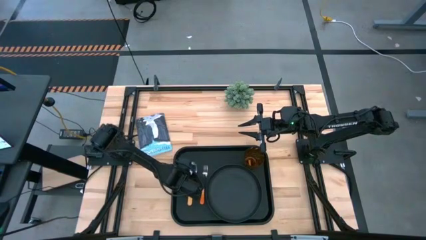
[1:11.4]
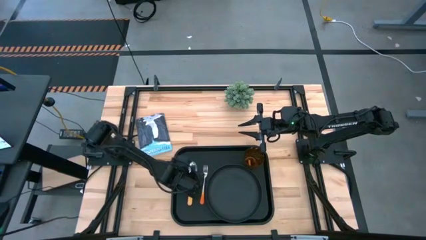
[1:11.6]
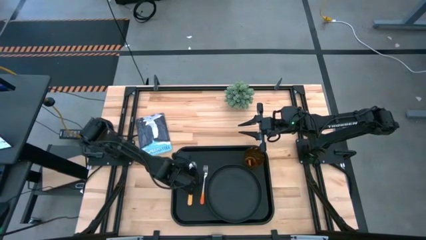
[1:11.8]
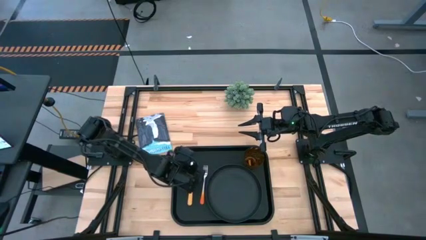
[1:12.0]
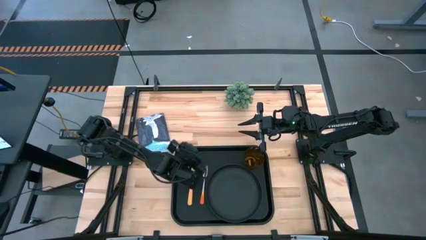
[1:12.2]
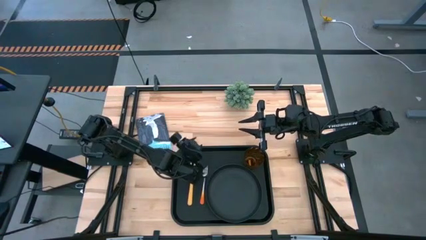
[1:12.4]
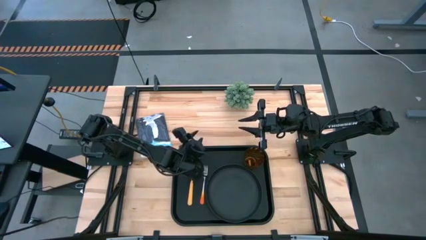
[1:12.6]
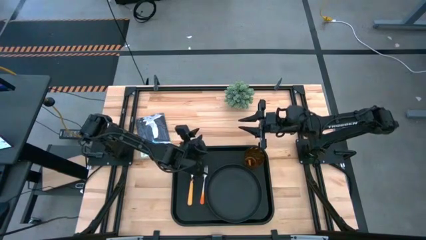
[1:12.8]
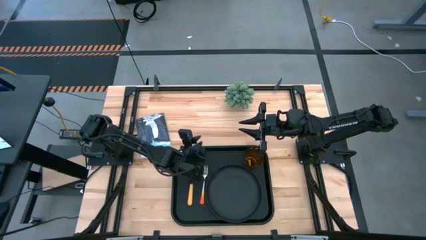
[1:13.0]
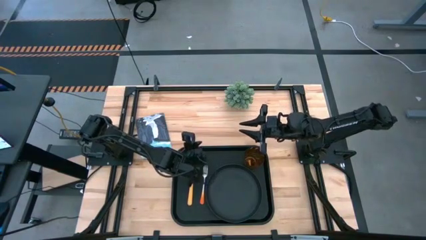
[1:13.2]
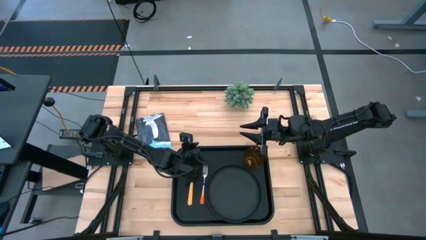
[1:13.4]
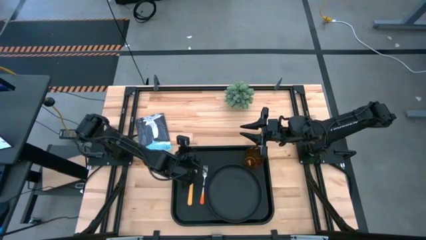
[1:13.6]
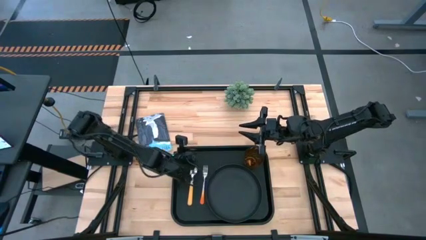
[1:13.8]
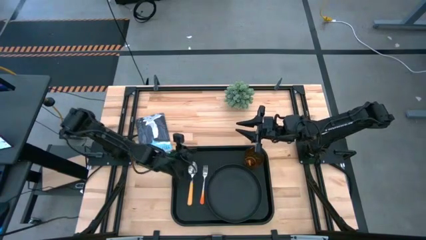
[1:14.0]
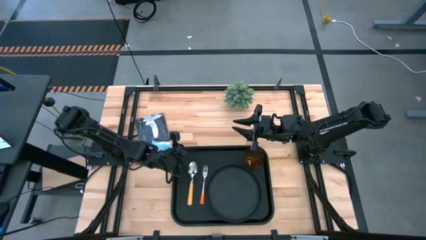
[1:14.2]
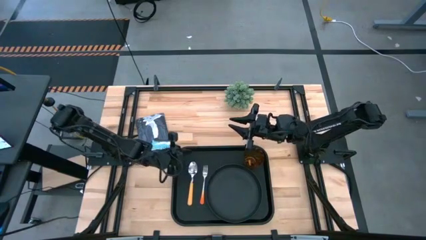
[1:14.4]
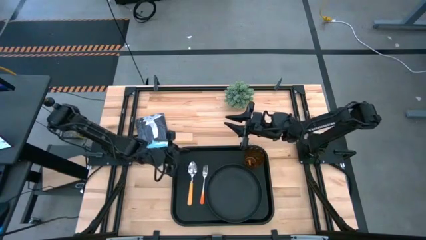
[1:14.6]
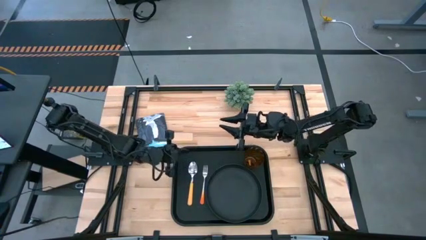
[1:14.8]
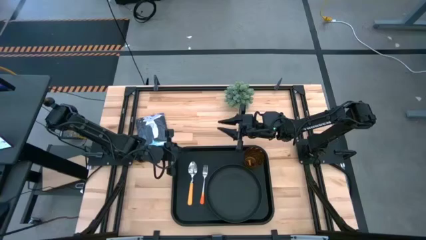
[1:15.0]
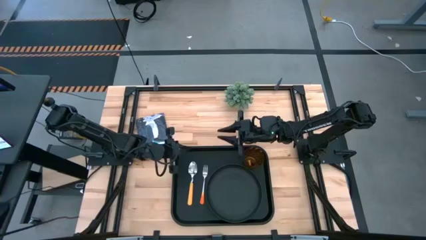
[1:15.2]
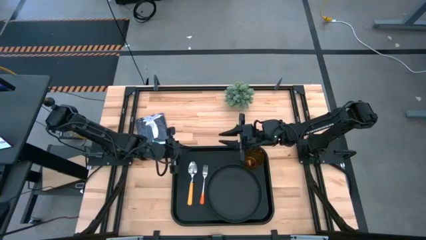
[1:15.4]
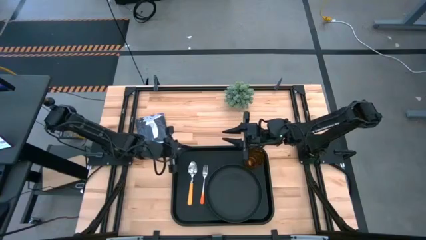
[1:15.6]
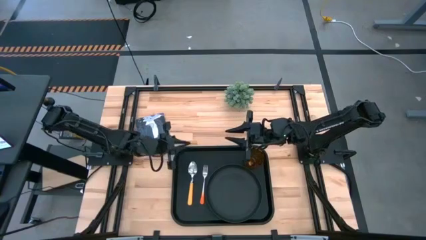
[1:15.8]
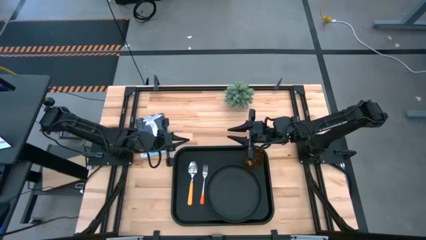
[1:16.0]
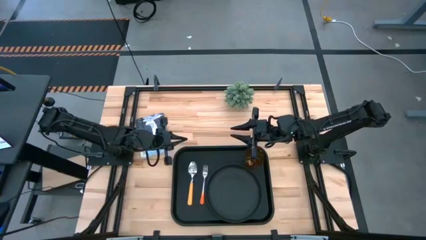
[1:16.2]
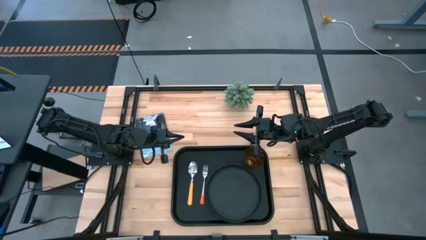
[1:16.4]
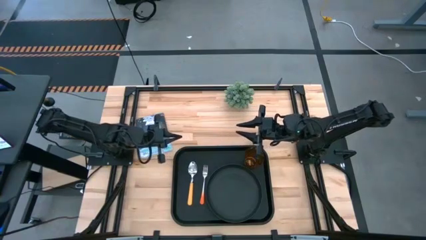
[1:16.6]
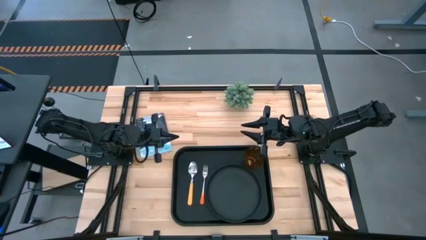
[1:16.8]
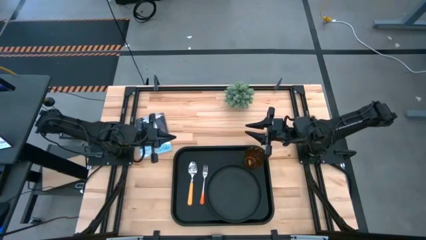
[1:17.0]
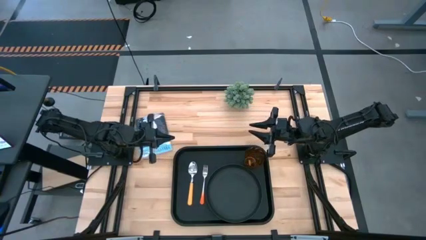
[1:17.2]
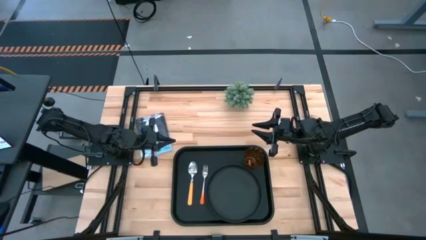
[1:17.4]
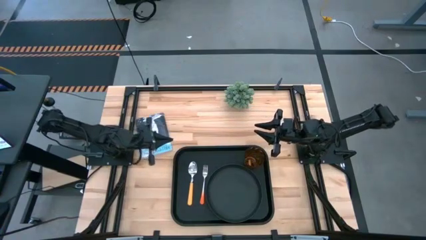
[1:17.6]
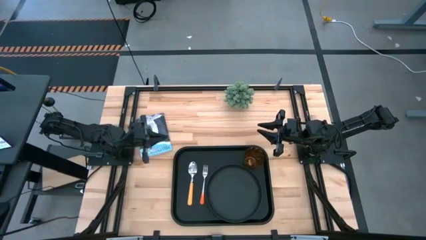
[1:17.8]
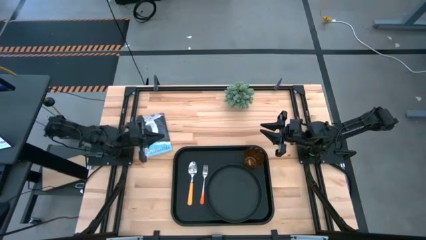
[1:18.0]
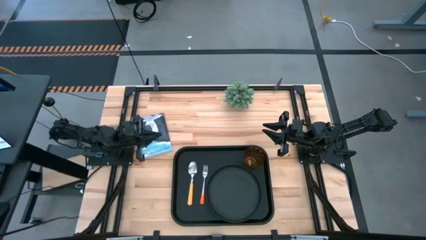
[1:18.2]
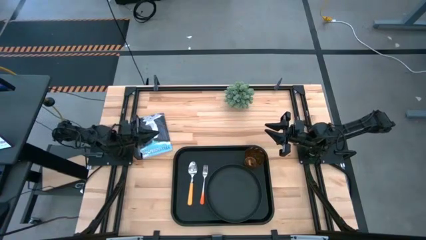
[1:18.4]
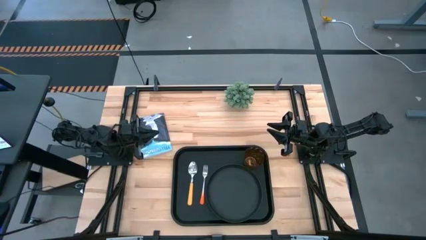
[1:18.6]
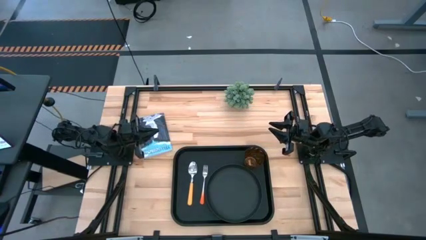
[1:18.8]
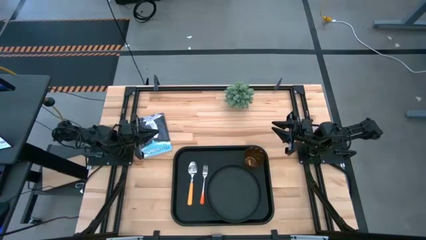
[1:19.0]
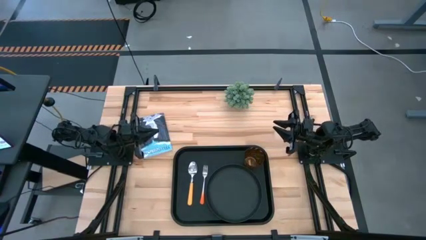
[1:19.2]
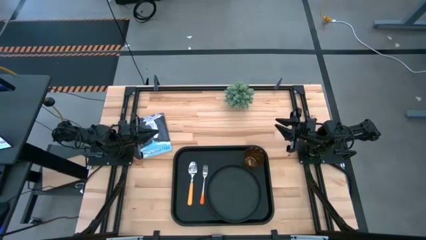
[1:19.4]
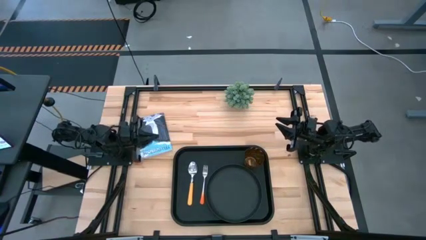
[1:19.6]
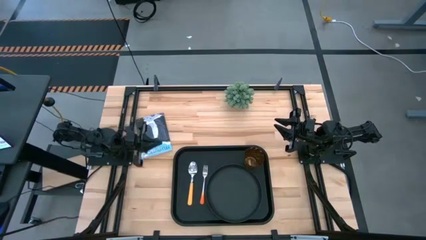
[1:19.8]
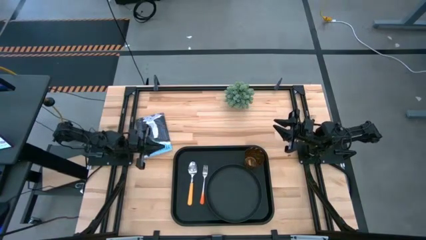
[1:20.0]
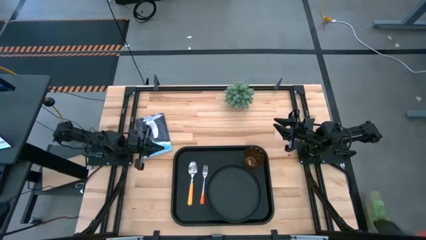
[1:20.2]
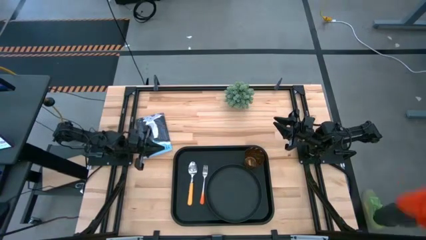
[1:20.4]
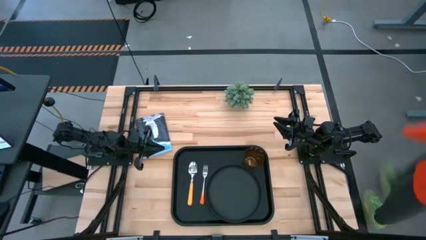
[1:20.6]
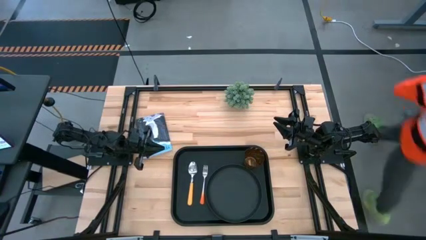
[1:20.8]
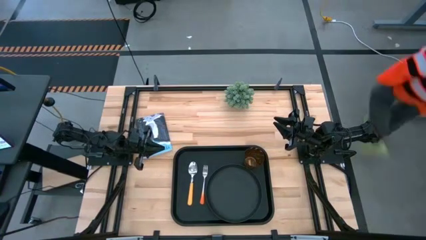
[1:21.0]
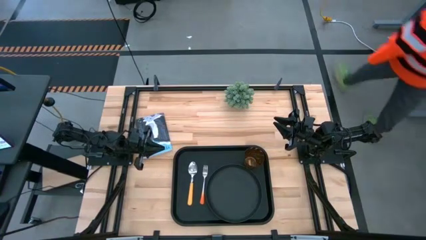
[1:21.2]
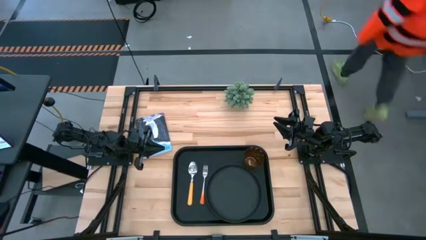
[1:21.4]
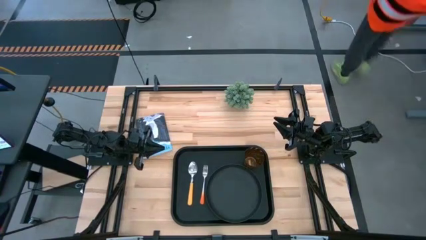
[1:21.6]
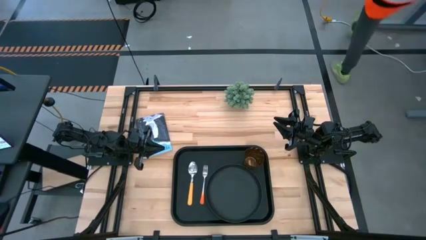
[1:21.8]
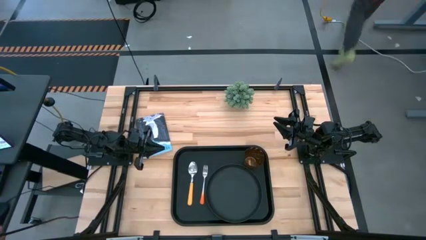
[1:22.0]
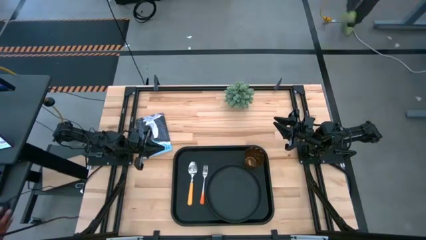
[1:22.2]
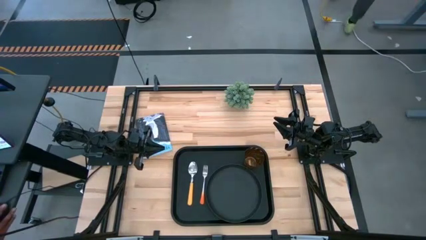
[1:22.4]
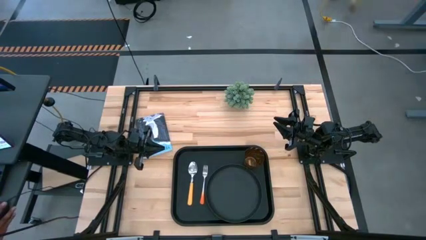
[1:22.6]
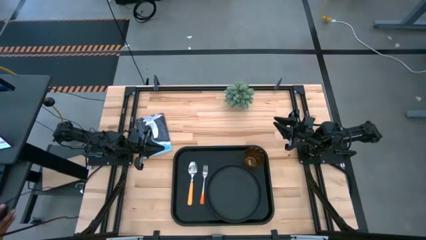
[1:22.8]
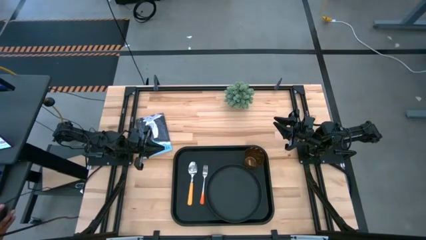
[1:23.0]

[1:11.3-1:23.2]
Task: Pick and place plate/cup/fork/spoon on tray
Return to home position
